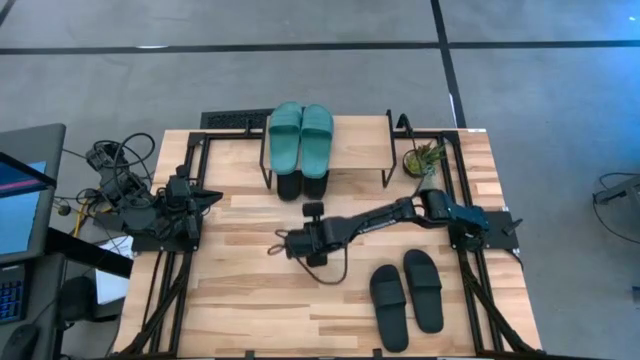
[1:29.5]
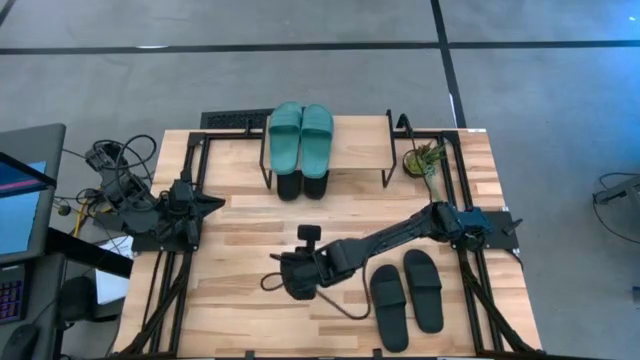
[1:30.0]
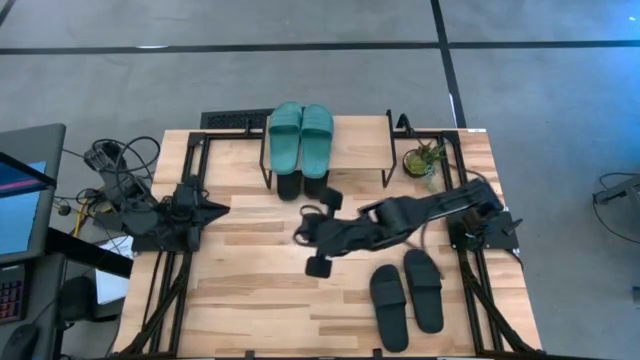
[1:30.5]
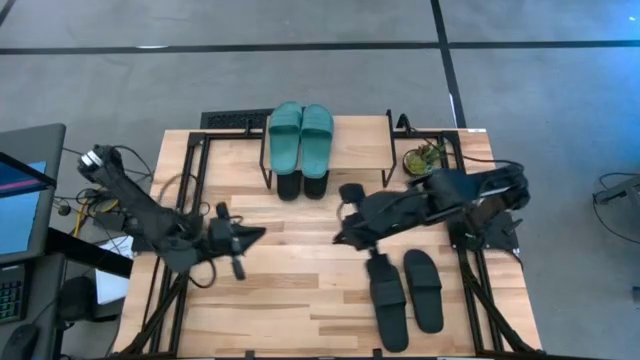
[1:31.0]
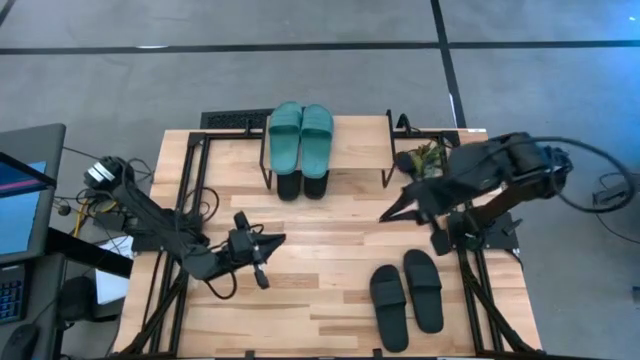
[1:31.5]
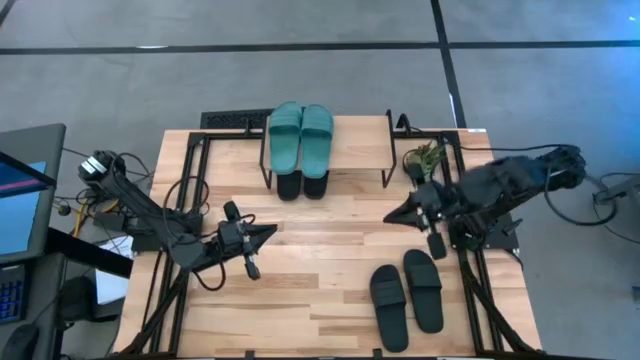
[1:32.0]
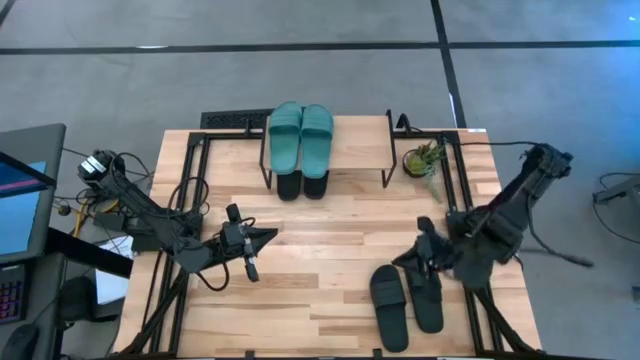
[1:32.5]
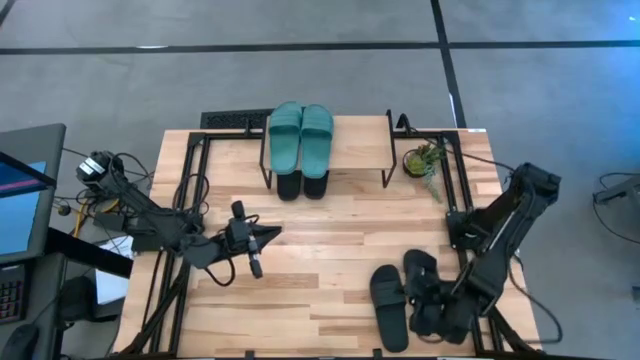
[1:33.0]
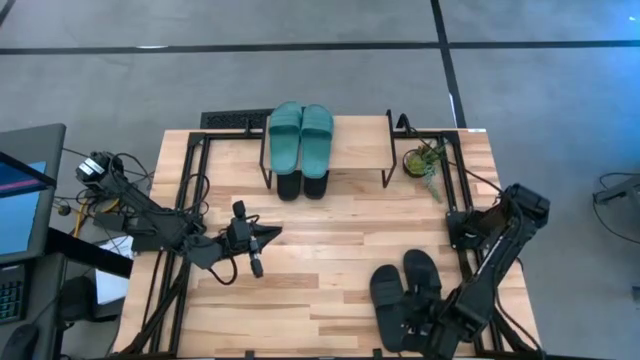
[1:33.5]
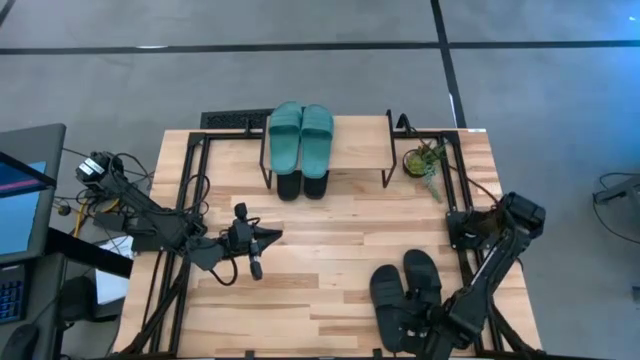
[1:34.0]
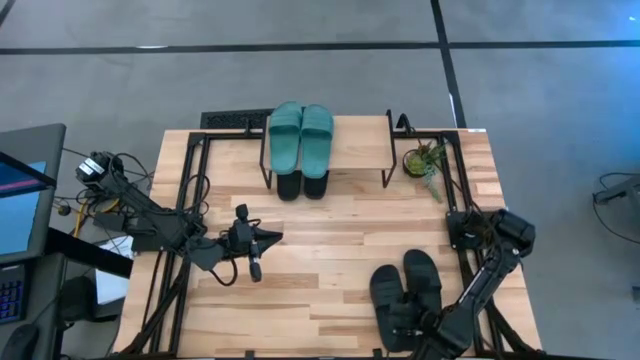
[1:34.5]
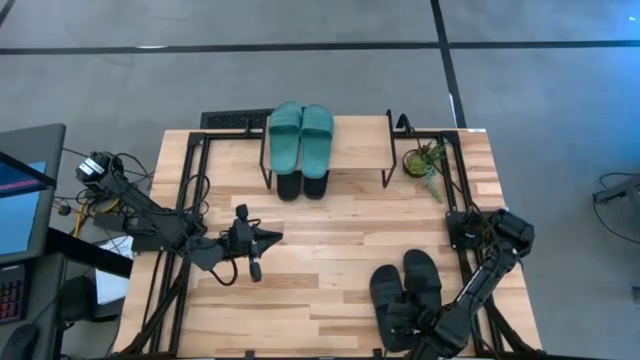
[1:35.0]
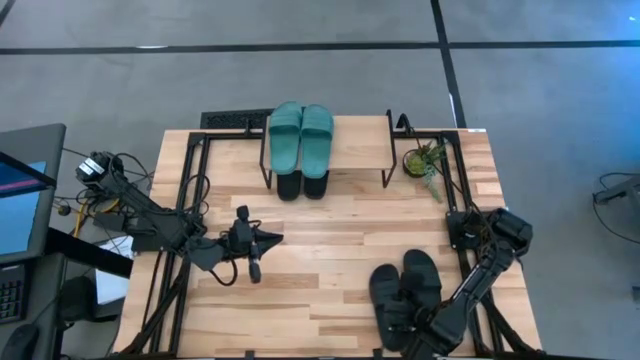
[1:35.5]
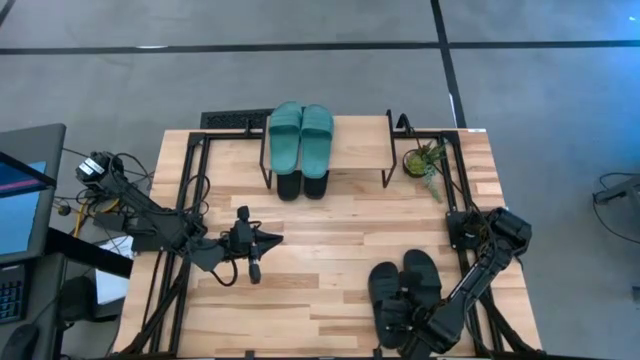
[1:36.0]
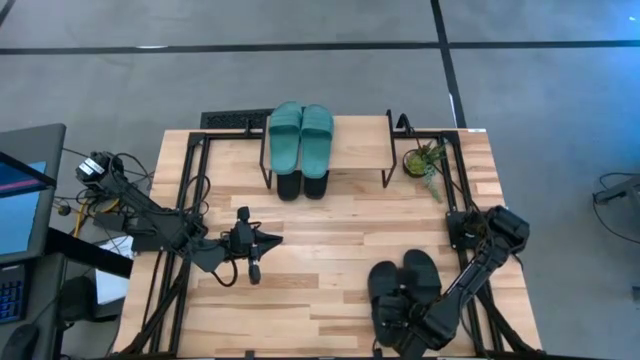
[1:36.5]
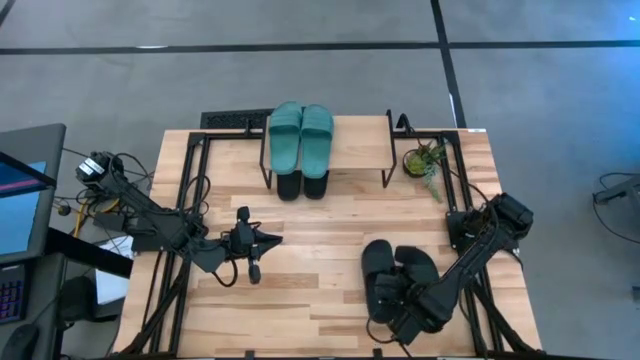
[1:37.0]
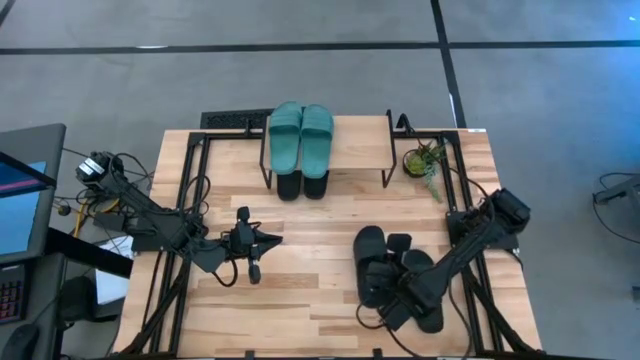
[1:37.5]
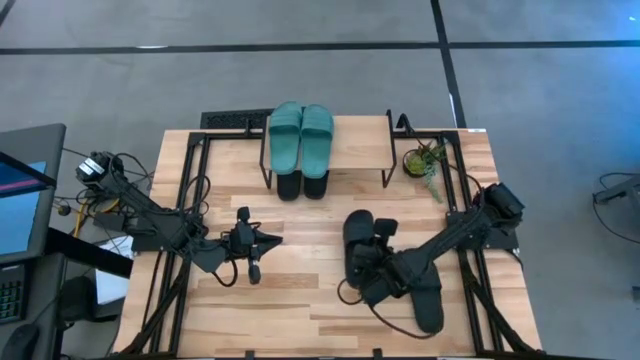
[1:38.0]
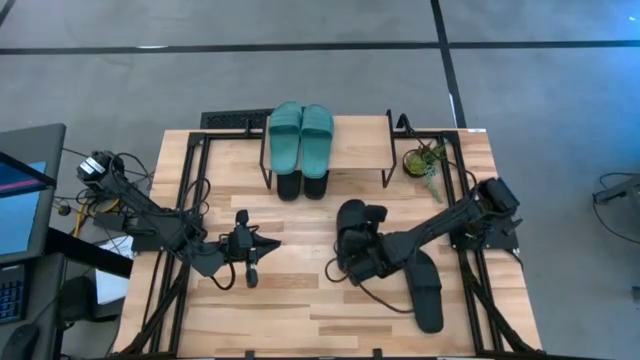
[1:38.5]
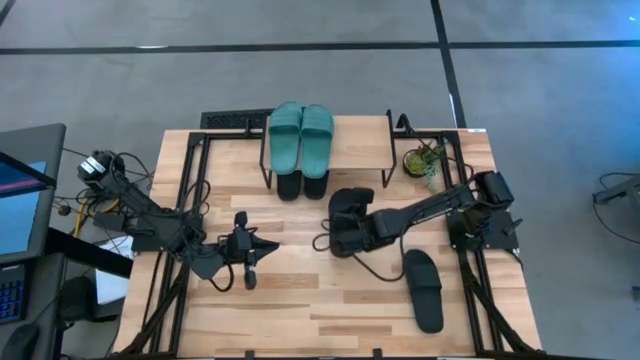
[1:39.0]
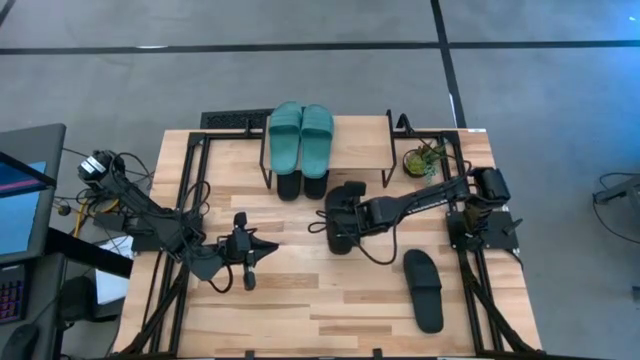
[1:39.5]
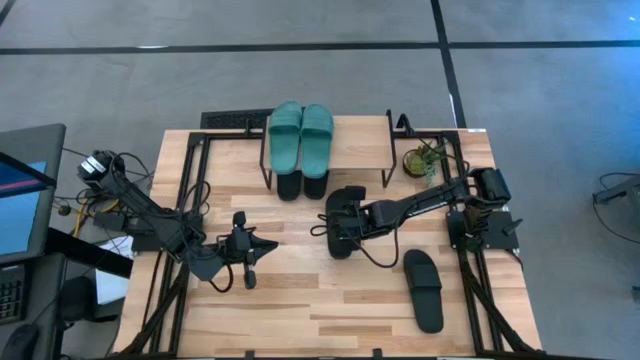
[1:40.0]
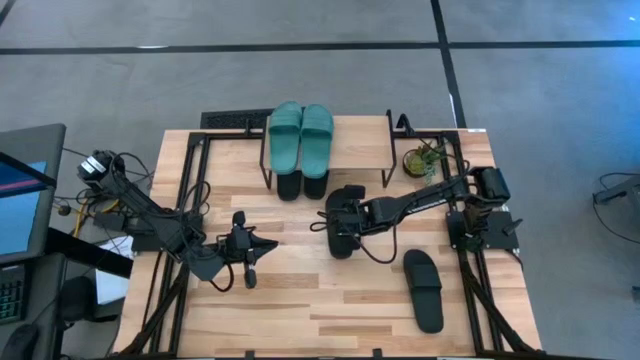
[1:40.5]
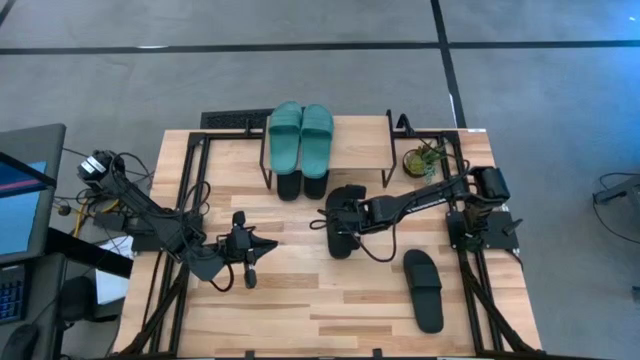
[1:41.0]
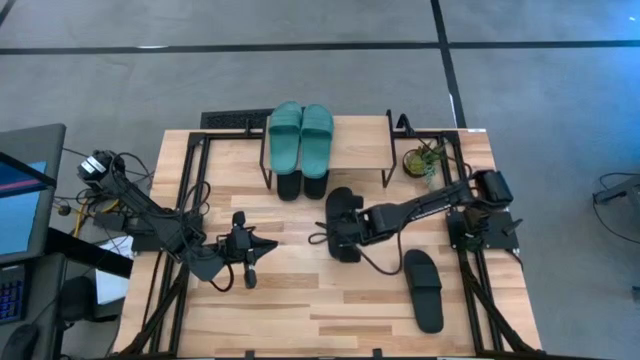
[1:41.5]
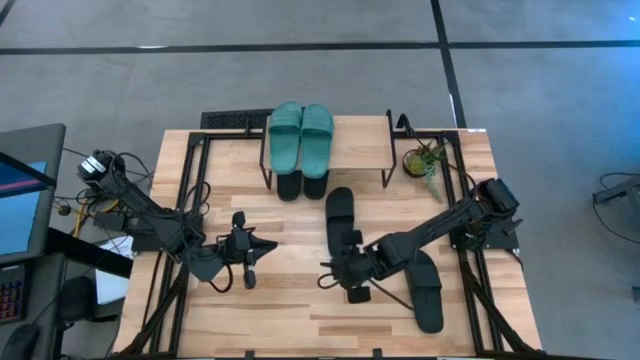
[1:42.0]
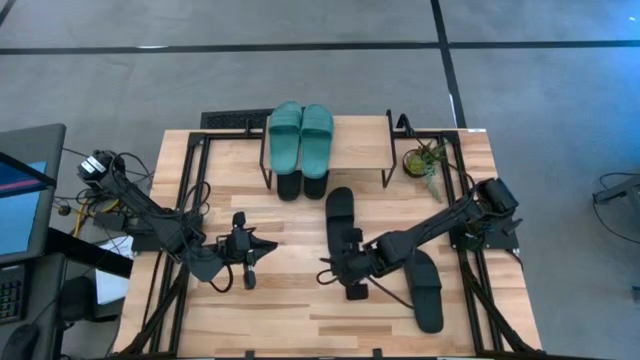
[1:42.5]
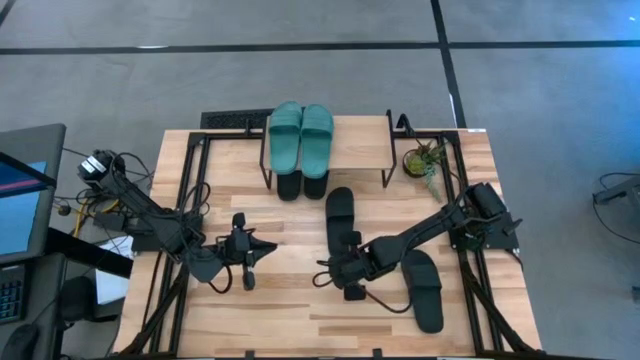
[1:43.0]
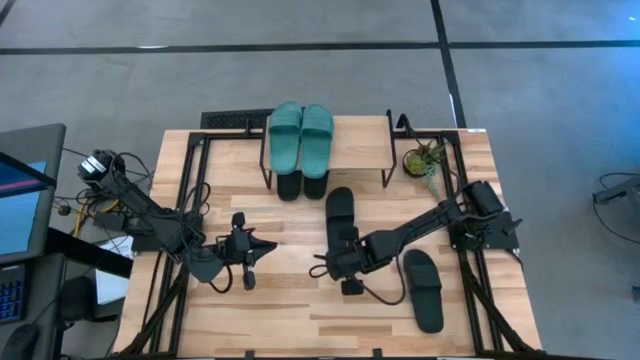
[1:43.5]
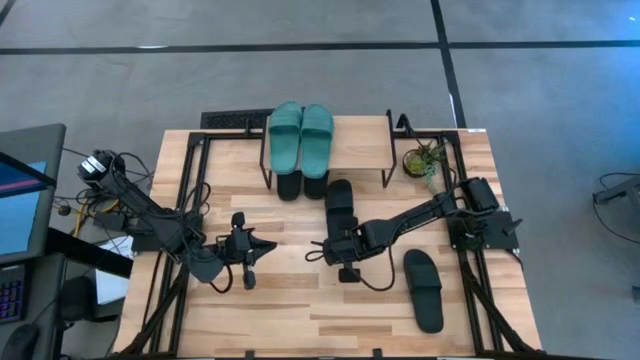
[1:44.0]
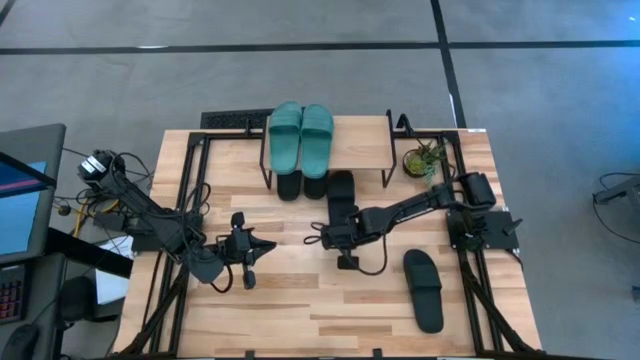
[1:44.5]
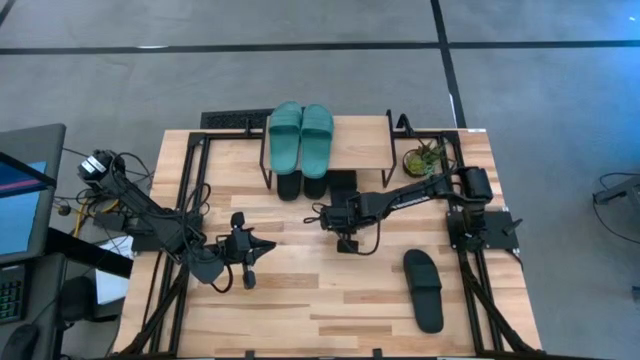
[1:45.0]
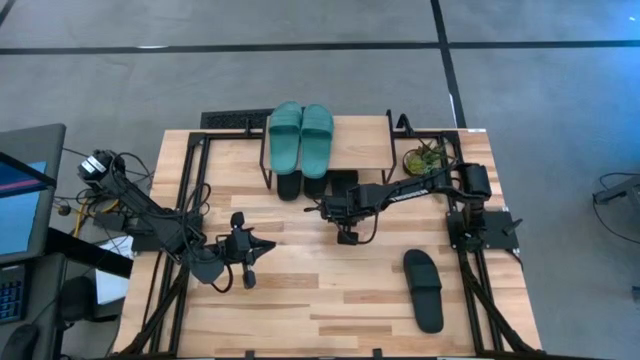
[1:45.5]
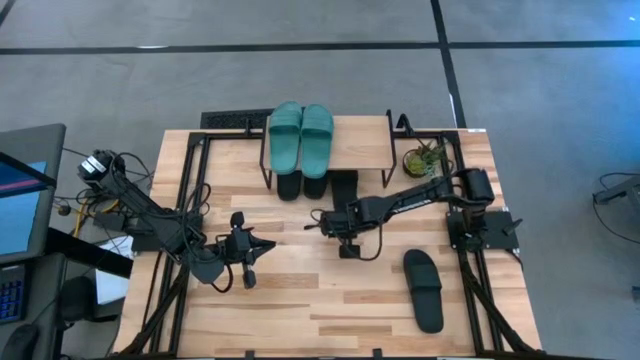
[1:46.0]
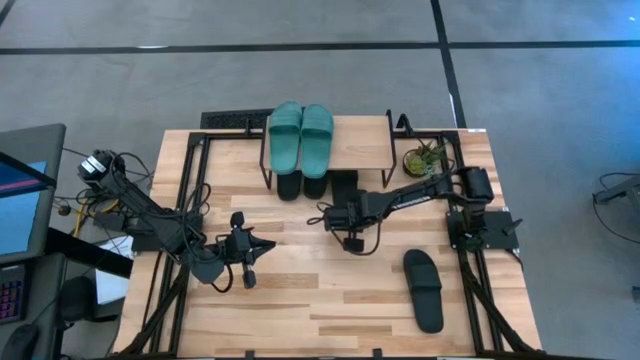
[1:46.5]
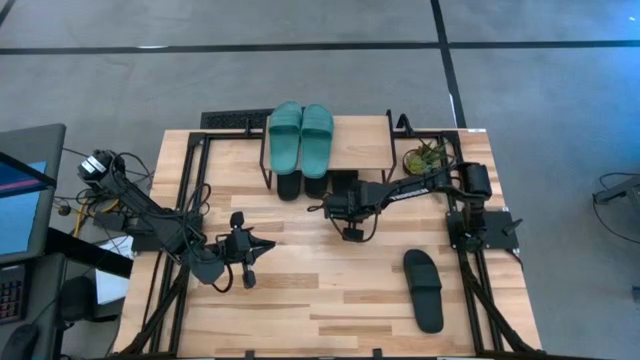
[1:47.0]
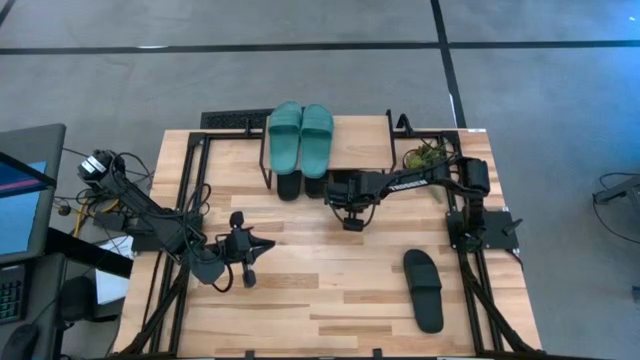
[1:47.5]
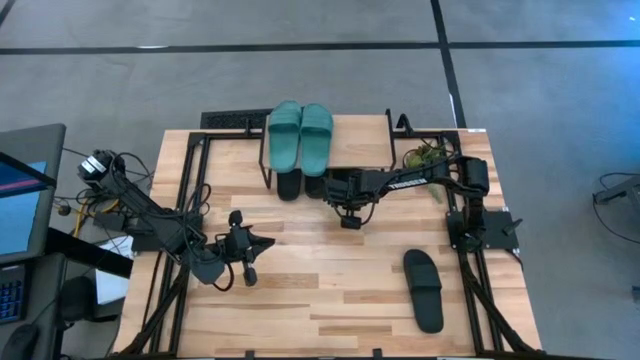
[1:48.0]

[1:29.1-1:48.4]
Task: Pick and place slides into the shelf
Put the right black slide under the shelf

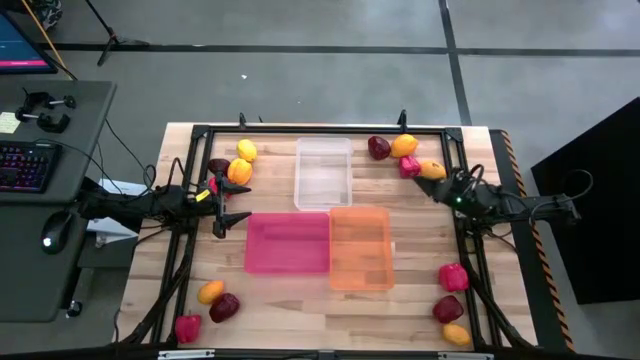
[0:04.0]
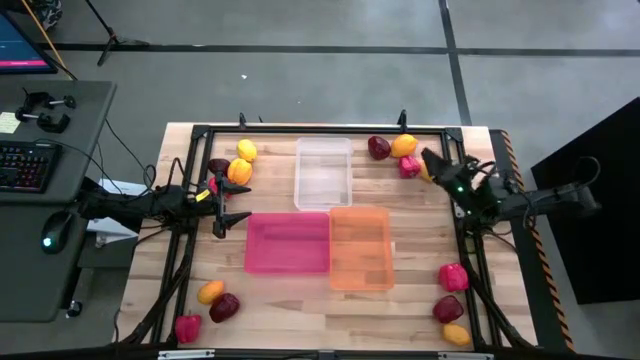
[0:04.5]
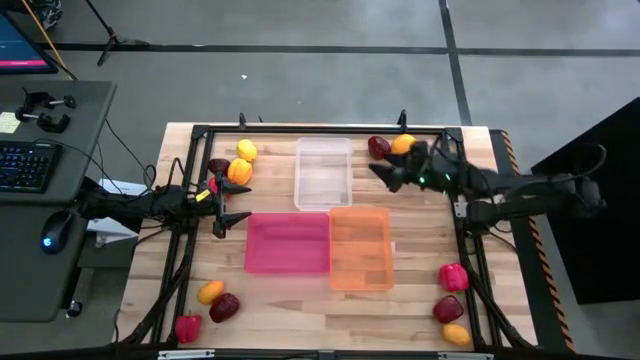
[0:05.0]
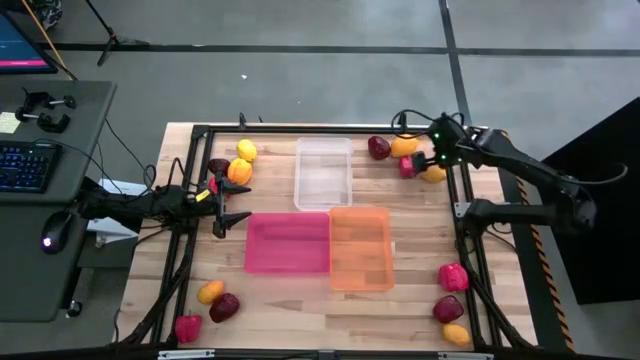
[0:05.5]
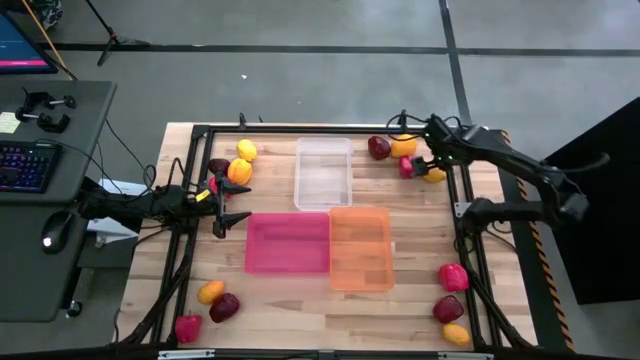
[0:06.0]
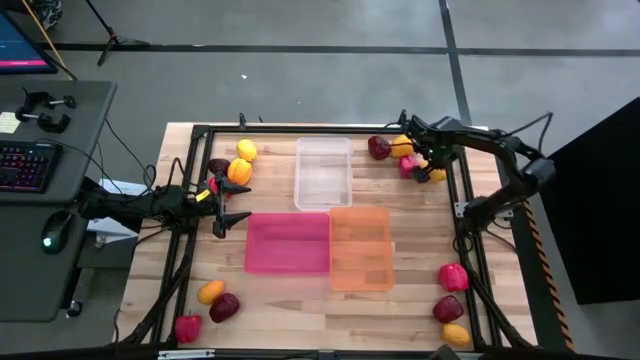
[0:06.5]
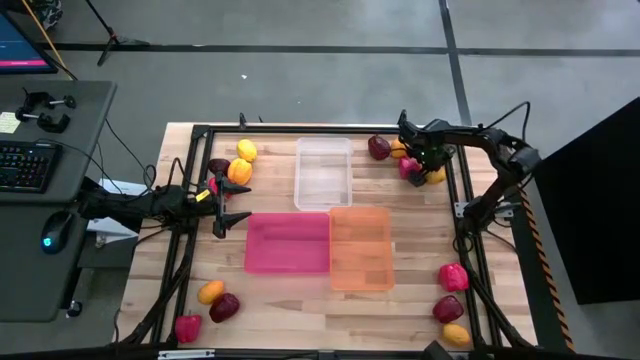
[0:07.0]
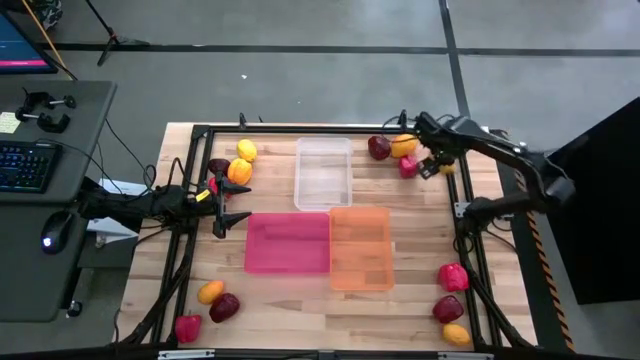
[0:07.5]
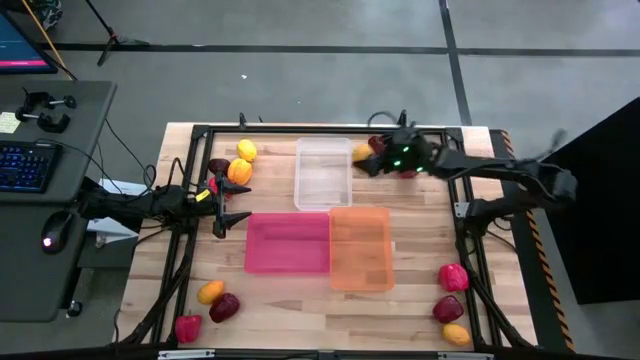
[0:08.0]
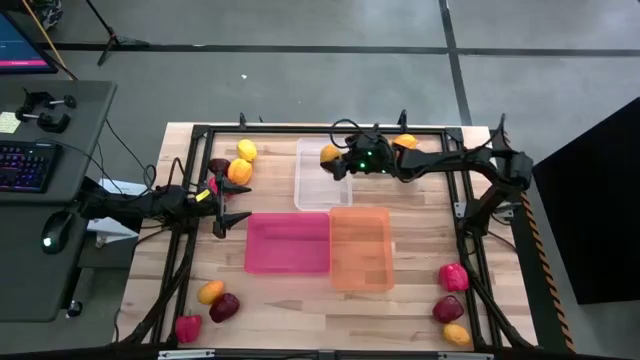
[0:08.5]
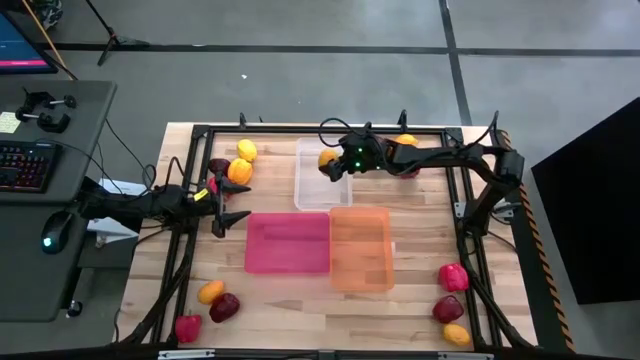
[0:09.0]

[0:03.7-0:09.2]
Task: Sort produce into baskets
Put the lemon into the white bin
